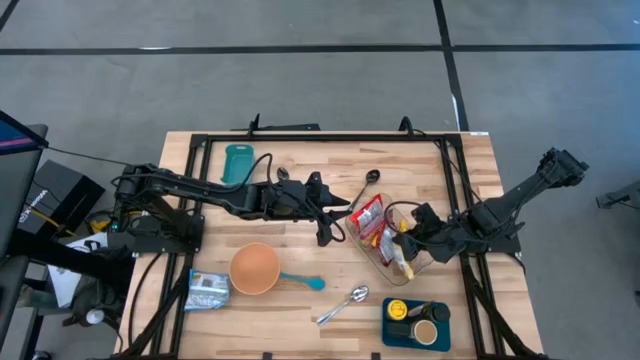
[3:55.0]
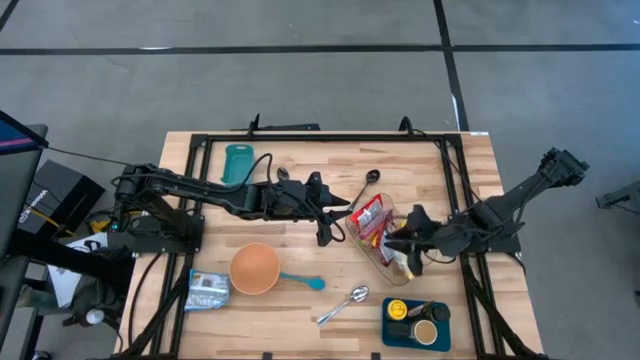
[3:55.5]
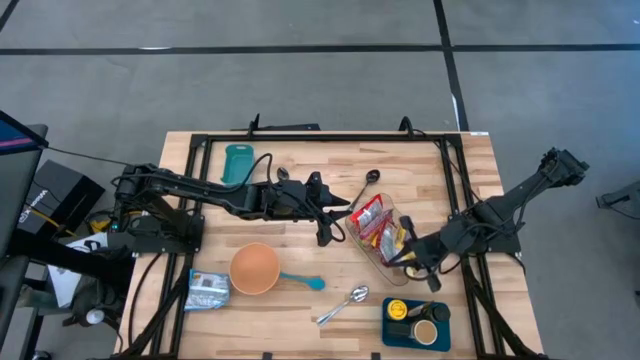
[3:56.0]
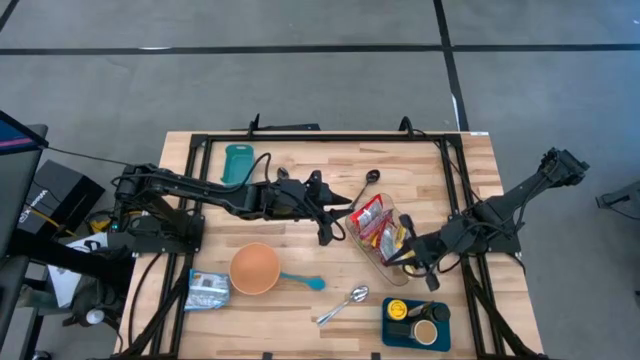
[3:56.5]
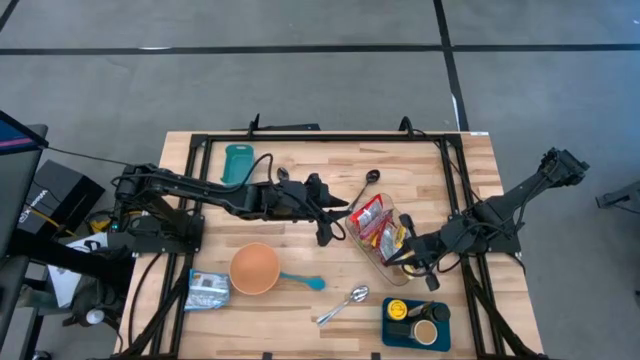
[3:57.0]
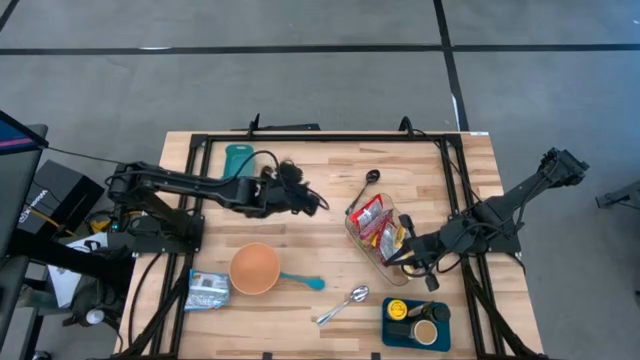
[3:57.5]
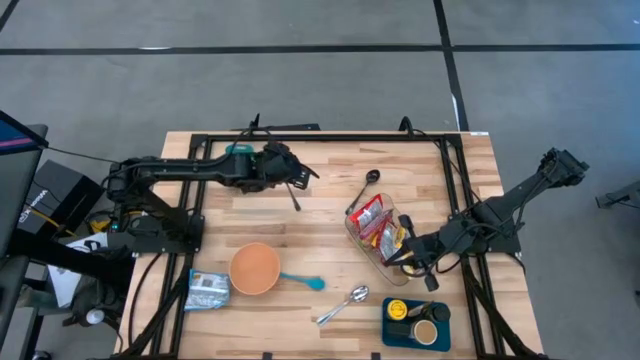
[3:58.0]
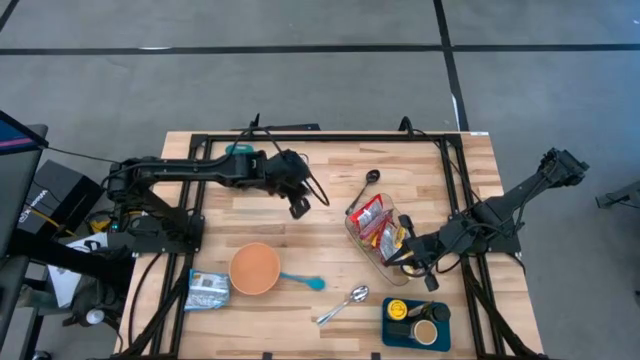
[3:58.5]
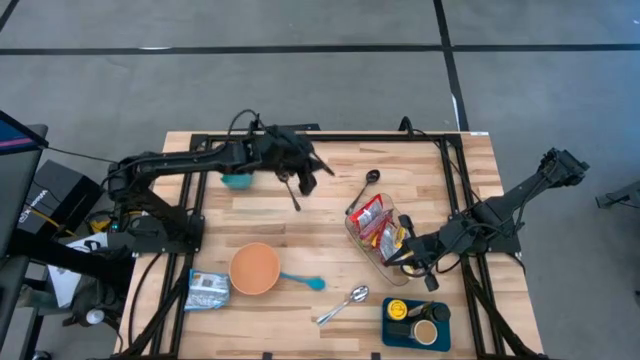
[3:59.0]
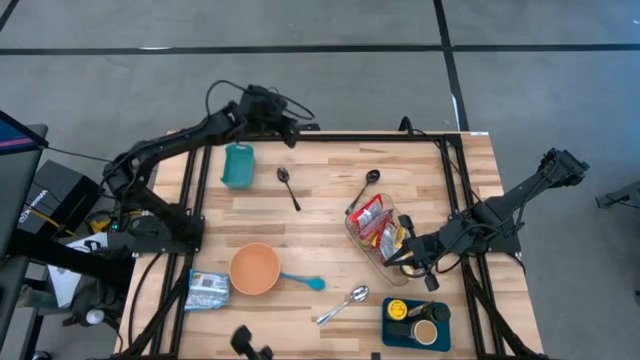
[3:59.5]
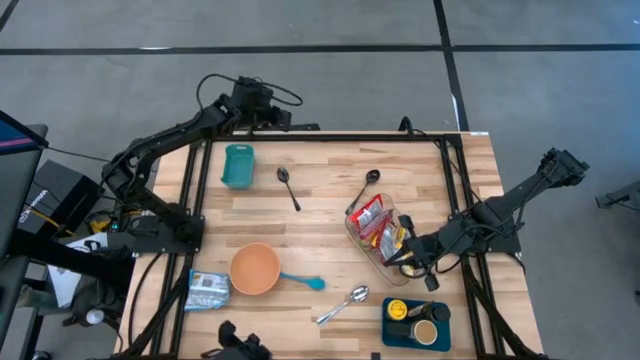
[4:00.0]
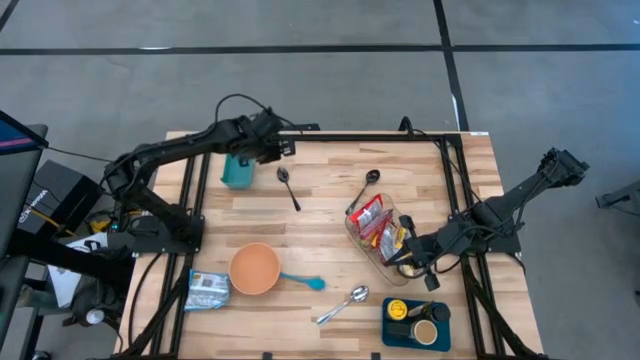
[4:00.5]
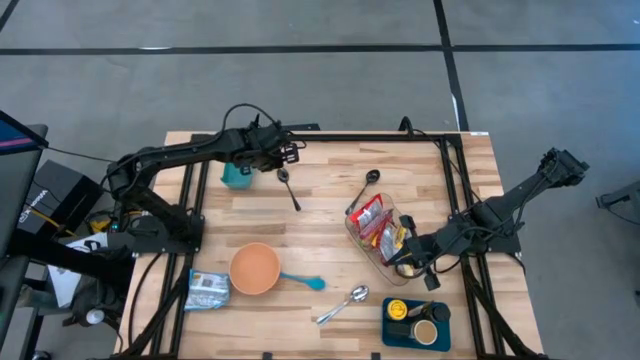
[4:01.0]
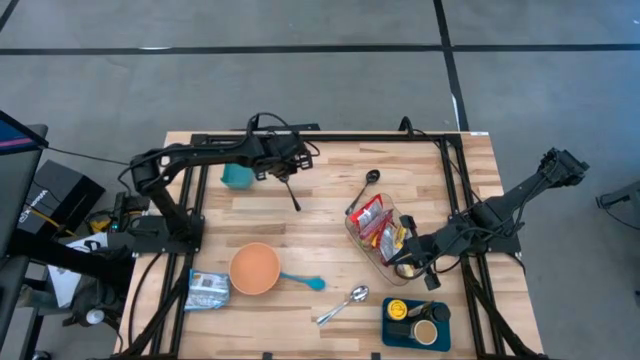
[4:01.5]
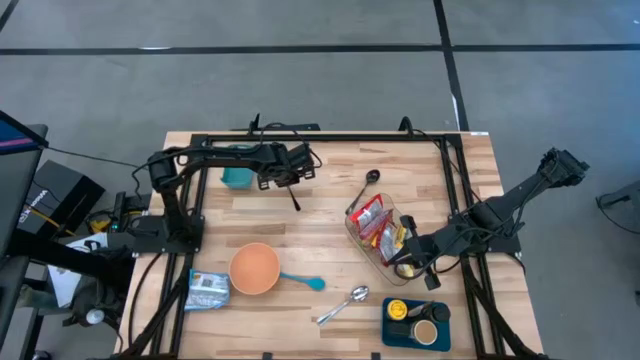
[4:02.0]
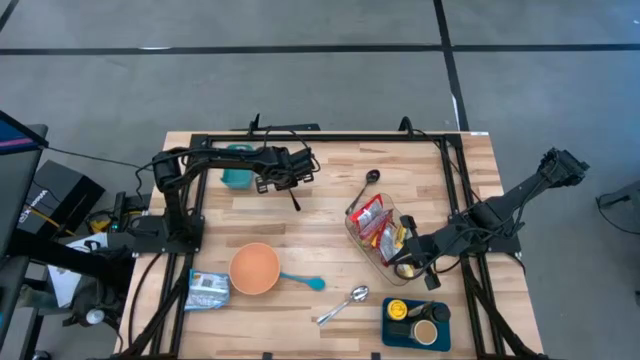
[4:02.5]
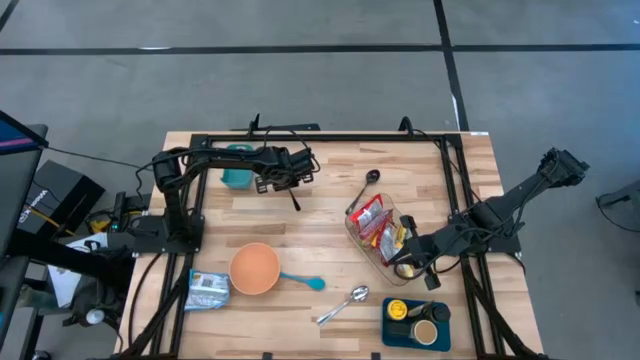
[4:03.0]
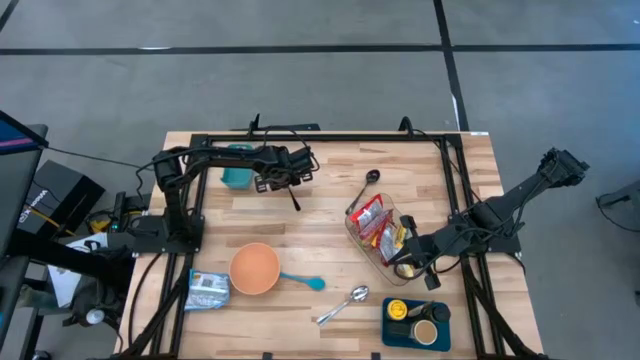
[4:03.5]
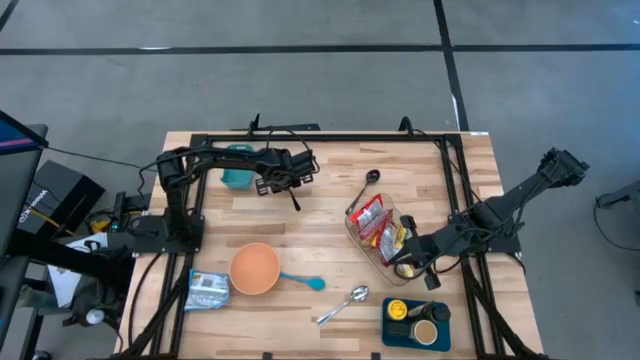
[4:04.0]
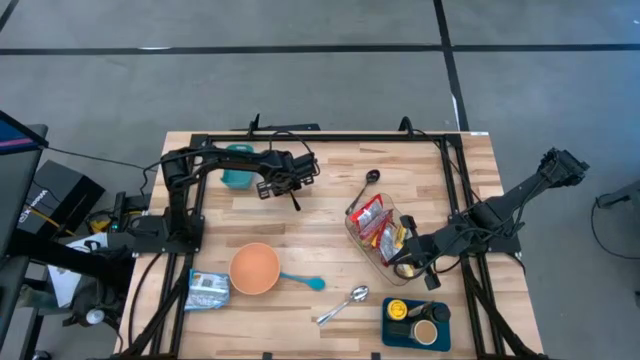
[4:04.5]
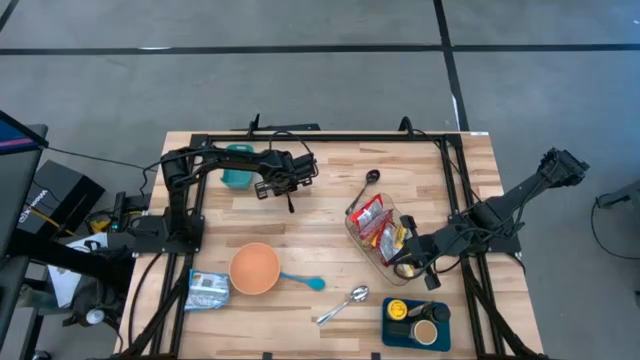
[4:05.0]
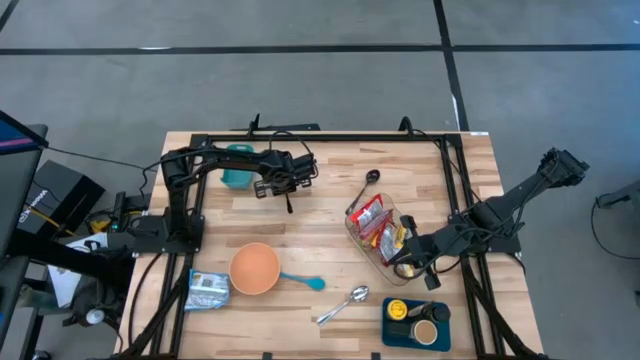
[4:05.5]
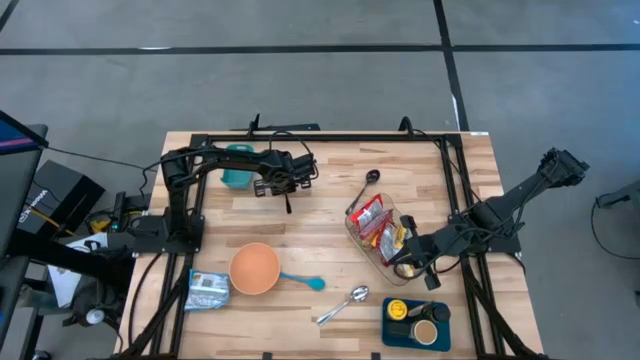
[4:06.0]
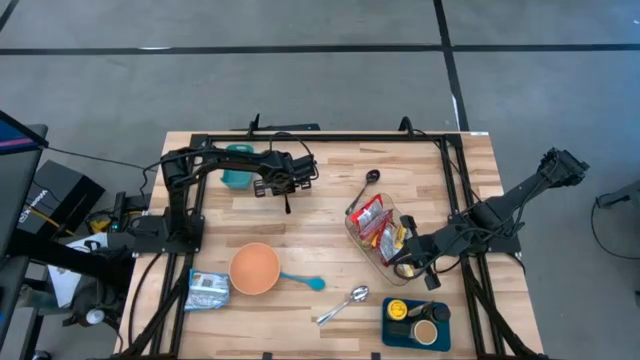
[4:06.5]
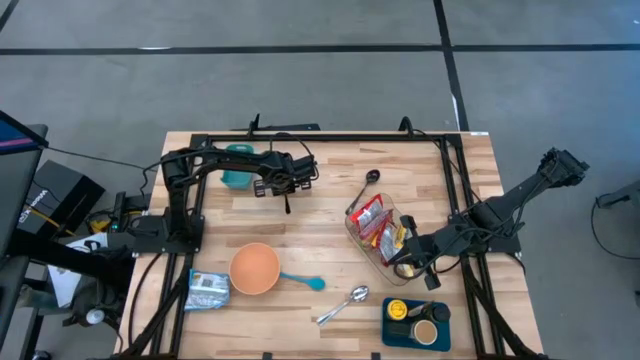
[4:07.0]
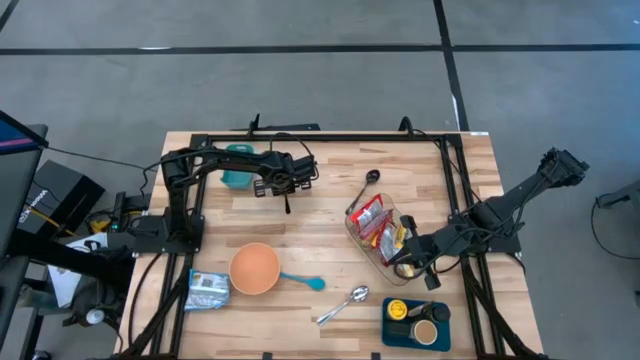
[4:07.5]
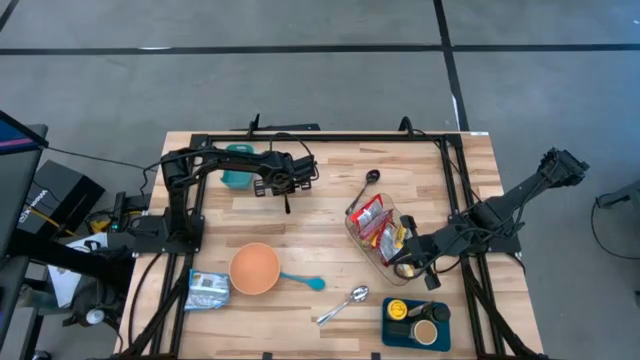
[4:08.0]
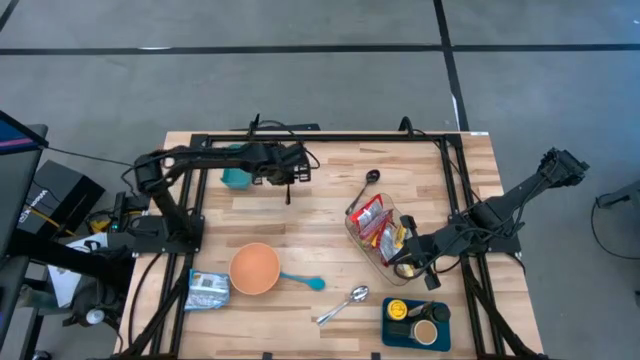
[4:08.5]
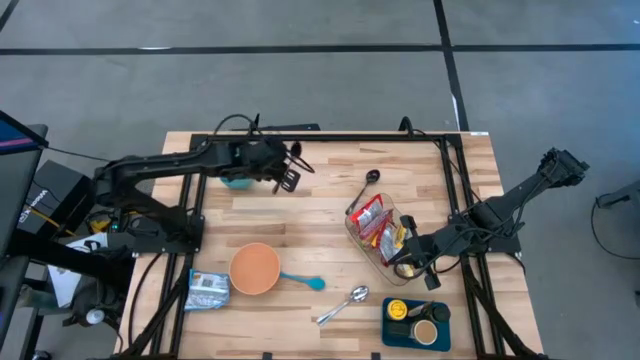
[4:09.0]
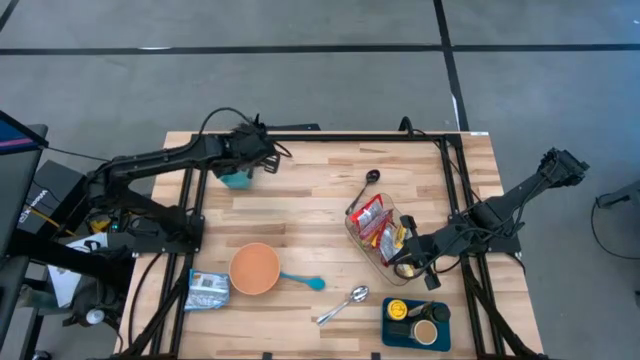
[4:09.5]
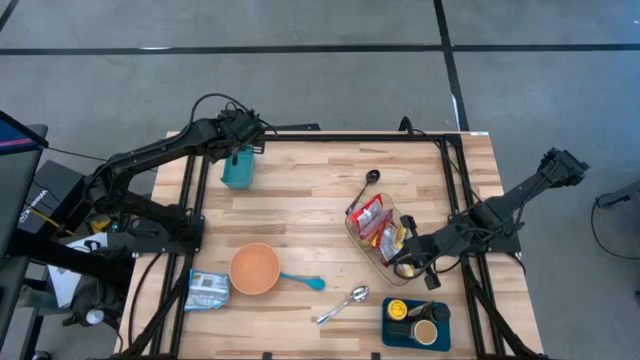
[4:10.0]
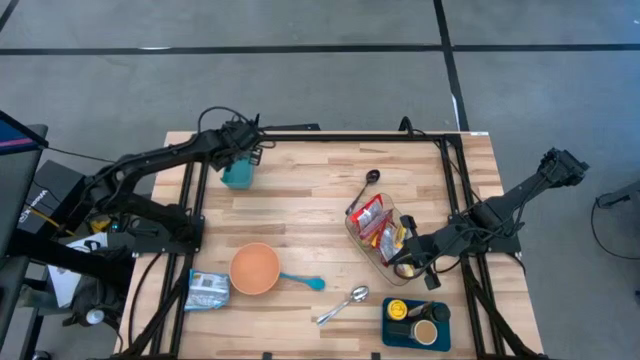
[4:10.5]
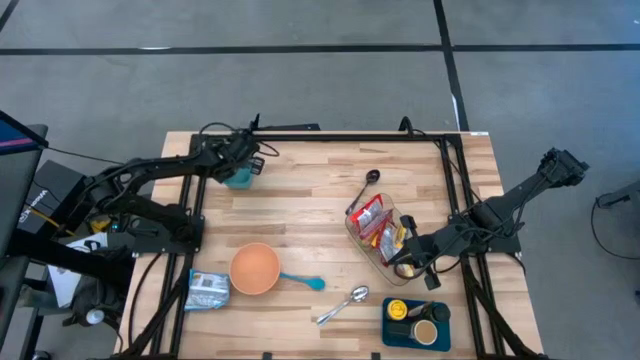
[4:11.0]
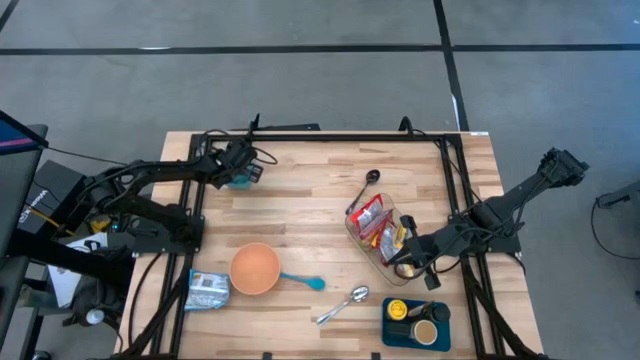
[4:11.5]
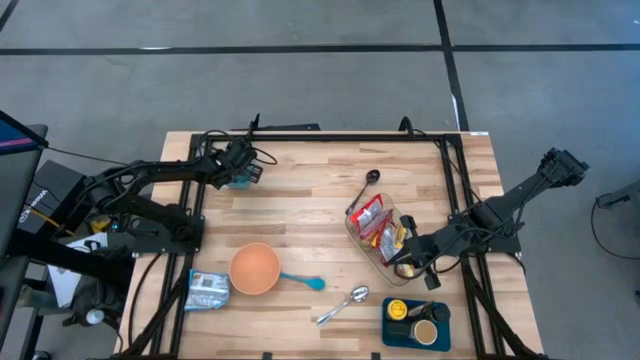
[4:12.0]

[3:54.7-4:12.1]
Task: Pick & Place Food Item
Put the left black spoon into the green bin

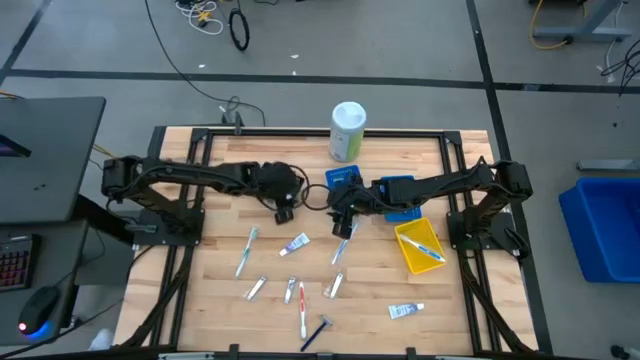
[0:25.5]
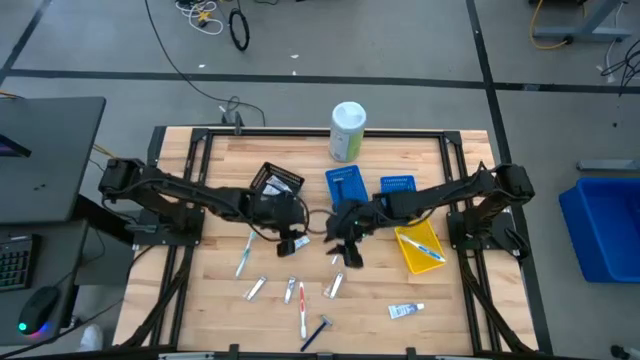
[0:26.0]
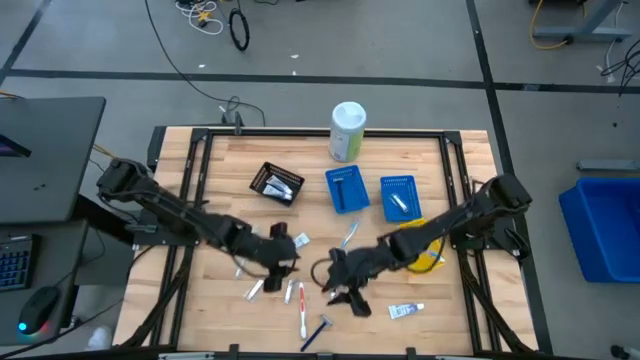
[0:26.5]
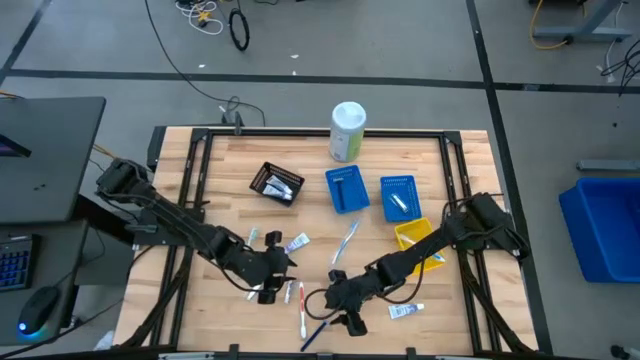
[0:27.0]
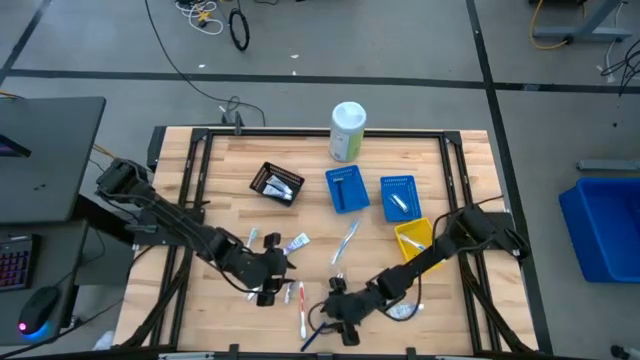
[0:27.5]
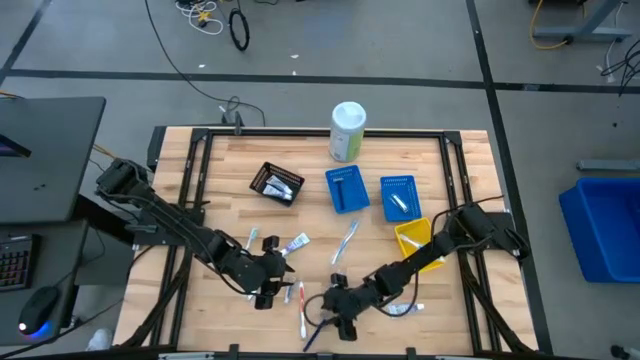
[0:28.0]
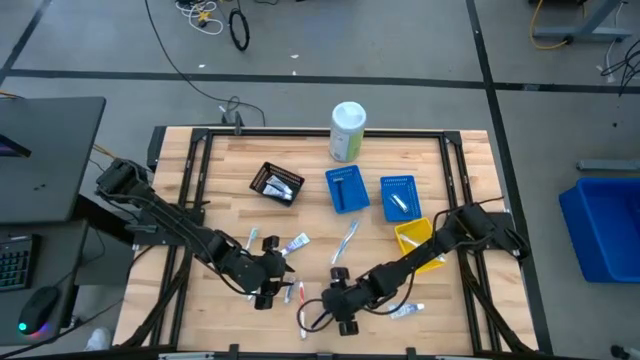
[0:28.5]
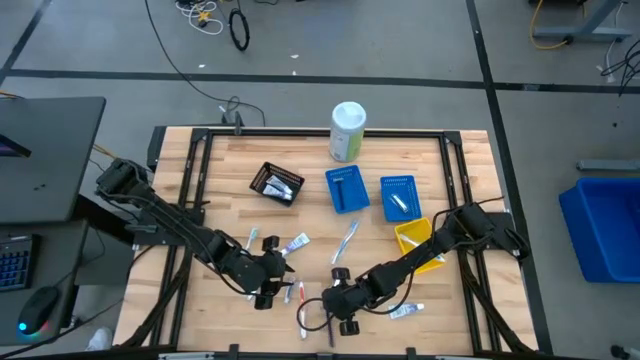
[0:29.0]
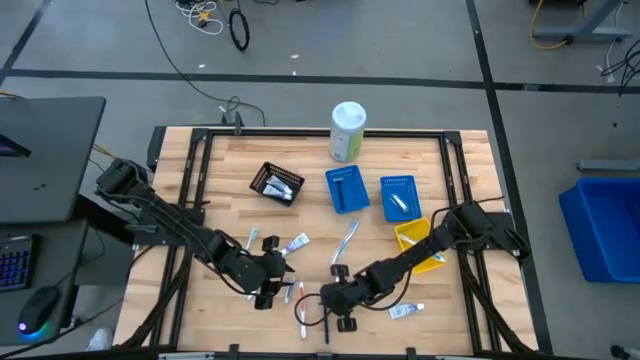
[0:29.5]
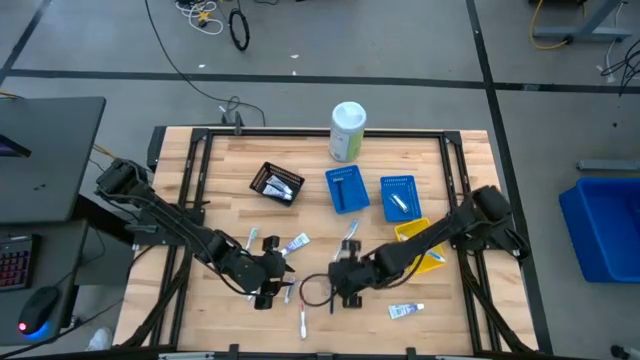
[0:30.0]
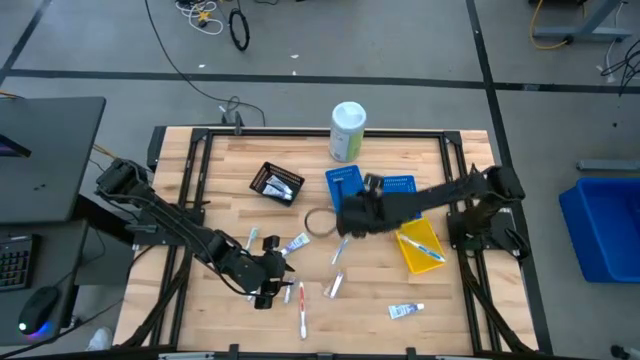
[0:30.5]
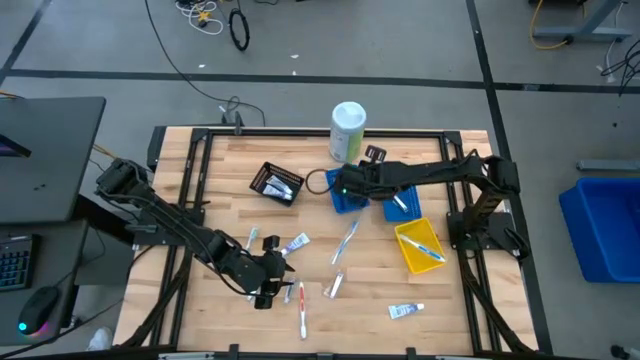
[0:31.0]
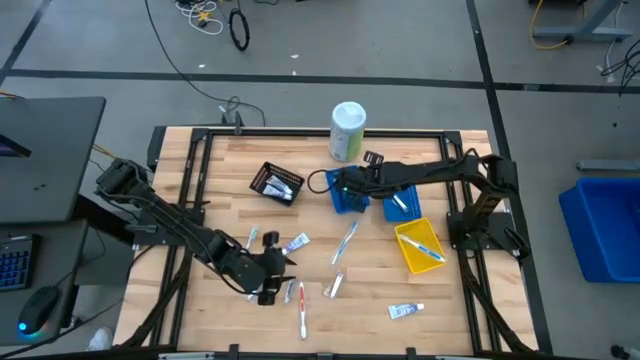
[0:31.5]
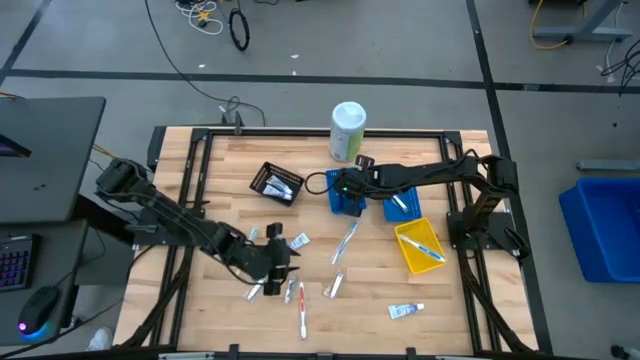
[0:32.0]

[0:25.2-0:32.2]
Task: Pick & Place Travel size toiletries
Put the razor into the left blue basket
